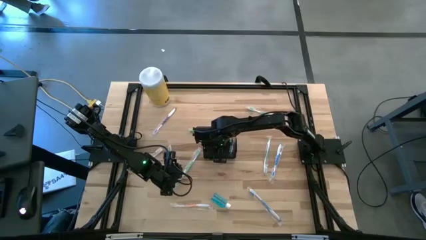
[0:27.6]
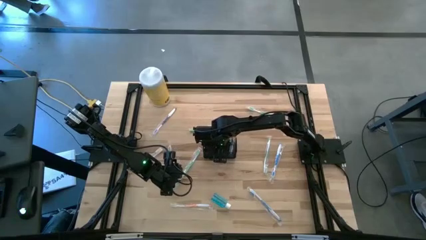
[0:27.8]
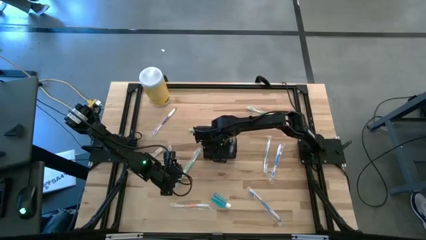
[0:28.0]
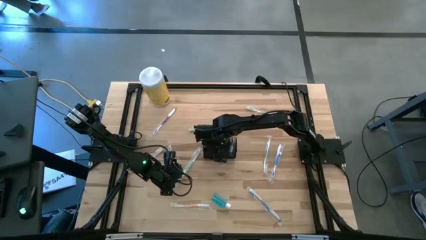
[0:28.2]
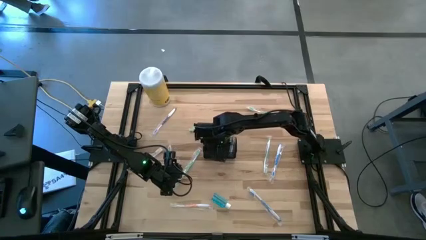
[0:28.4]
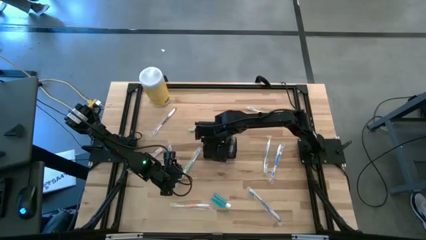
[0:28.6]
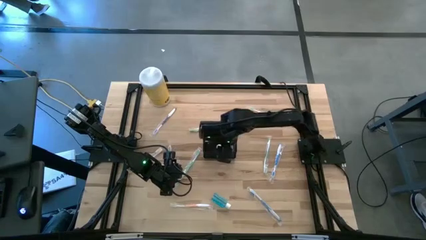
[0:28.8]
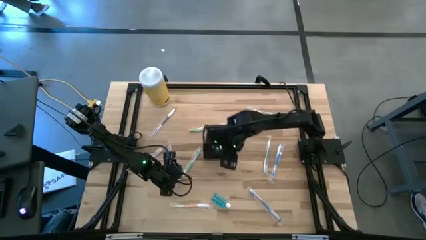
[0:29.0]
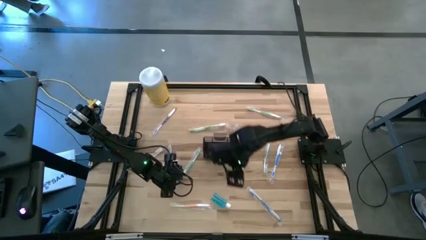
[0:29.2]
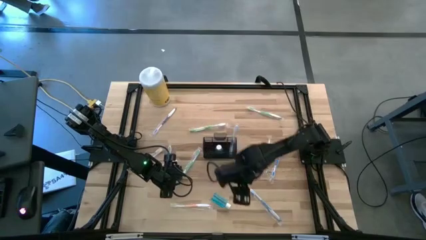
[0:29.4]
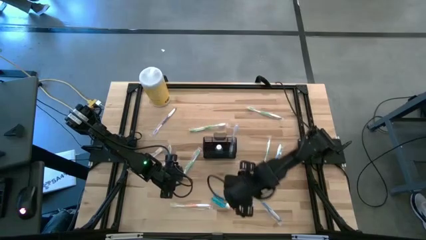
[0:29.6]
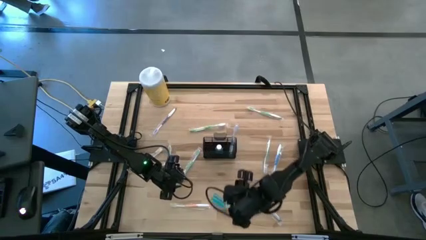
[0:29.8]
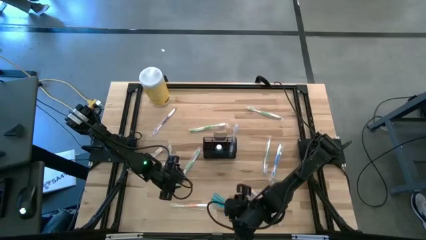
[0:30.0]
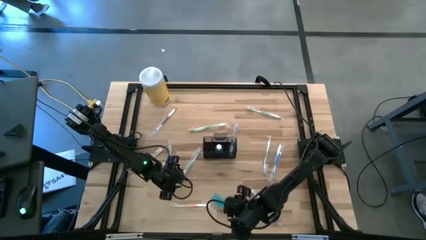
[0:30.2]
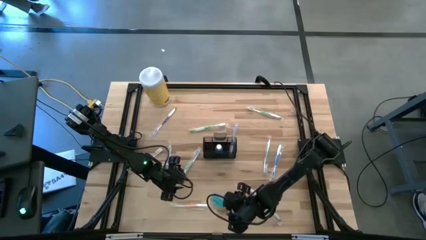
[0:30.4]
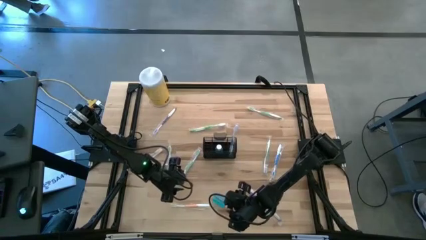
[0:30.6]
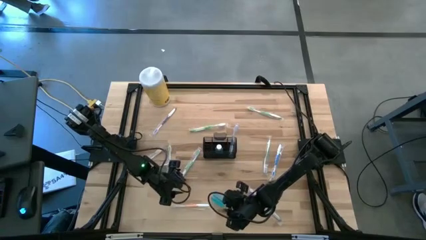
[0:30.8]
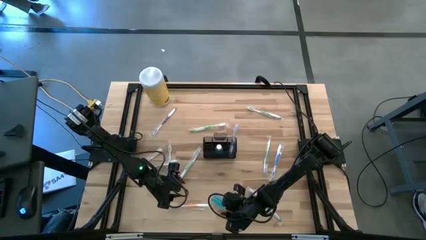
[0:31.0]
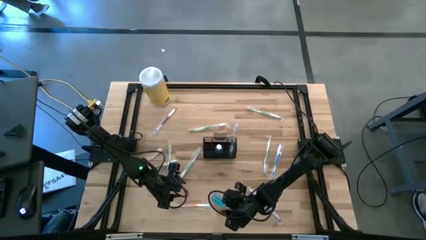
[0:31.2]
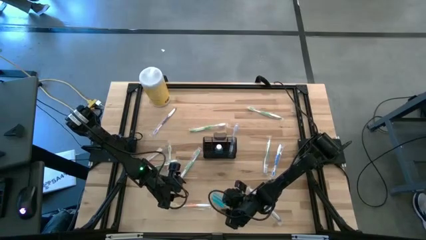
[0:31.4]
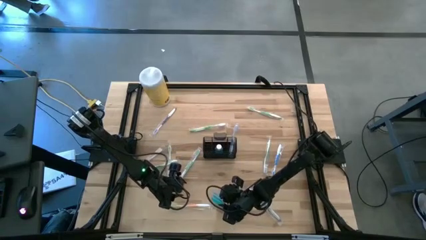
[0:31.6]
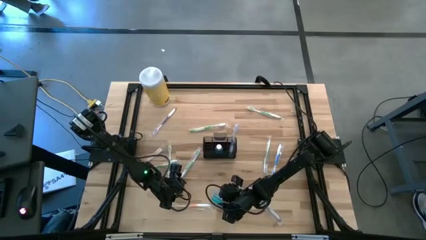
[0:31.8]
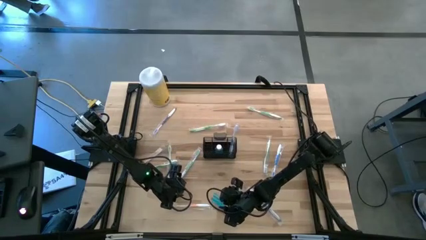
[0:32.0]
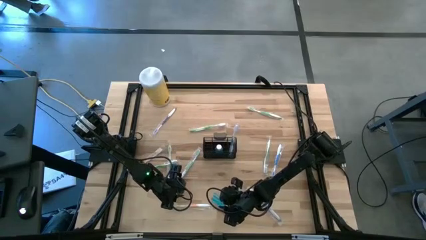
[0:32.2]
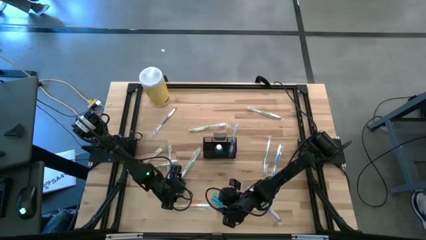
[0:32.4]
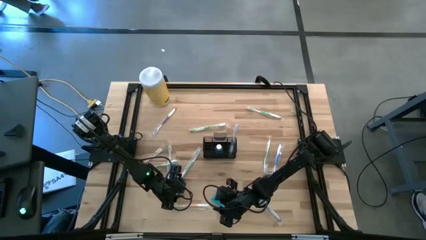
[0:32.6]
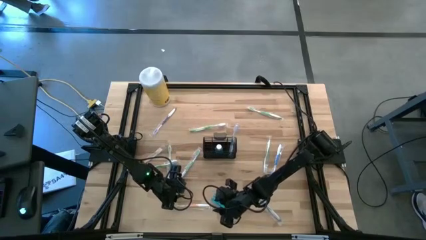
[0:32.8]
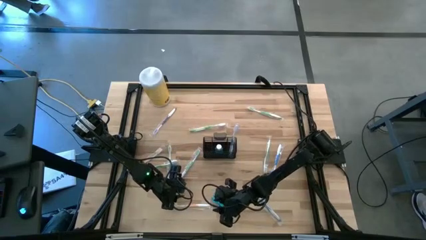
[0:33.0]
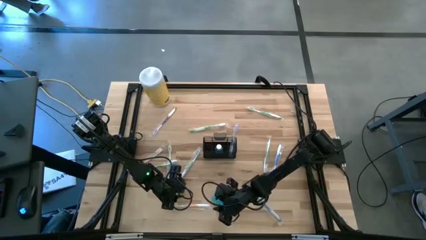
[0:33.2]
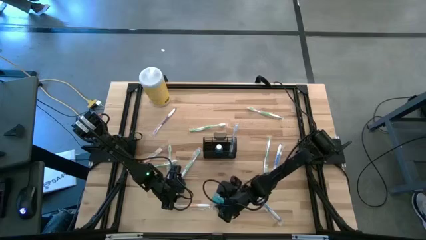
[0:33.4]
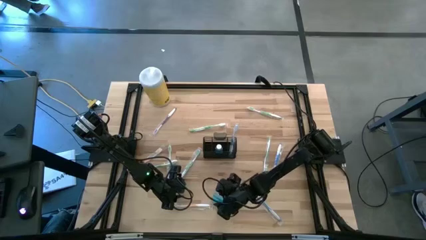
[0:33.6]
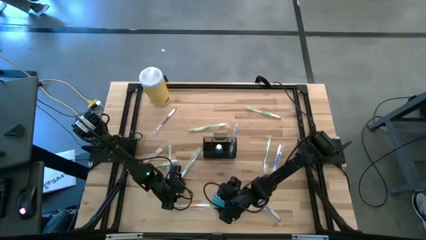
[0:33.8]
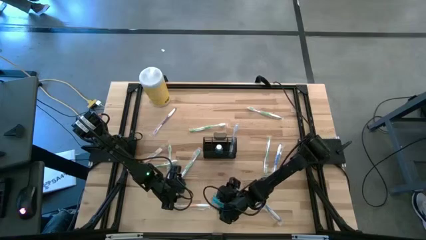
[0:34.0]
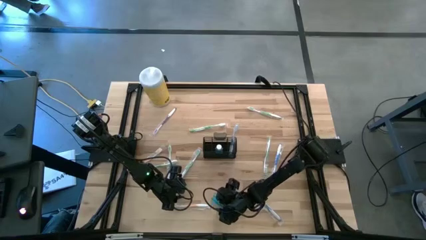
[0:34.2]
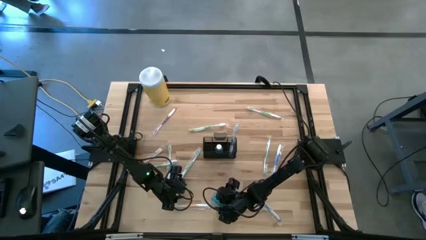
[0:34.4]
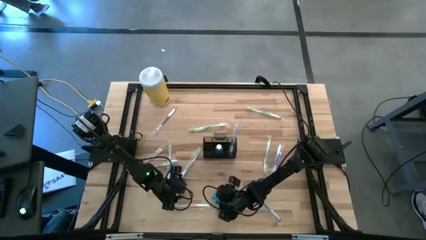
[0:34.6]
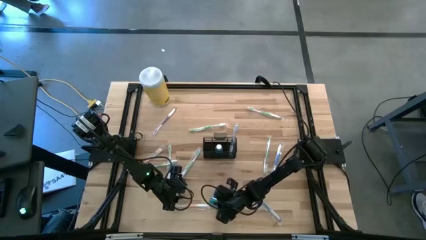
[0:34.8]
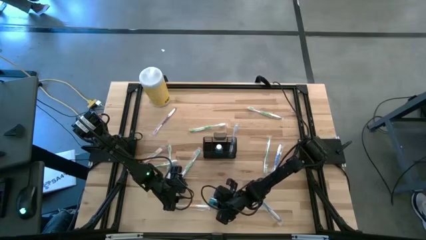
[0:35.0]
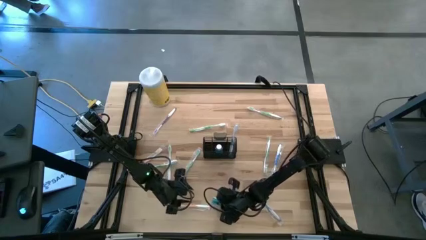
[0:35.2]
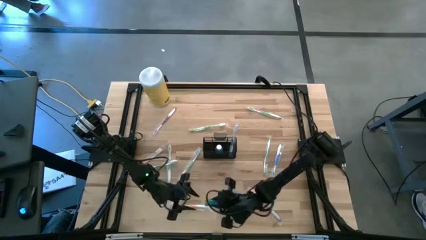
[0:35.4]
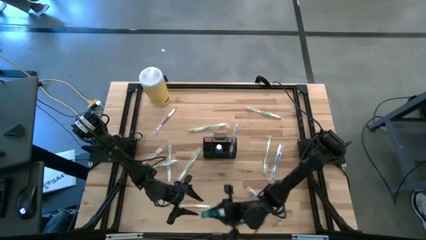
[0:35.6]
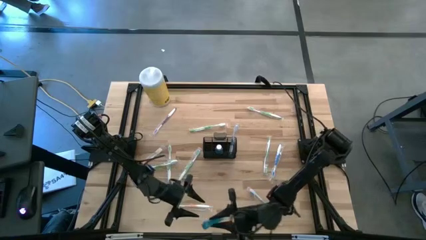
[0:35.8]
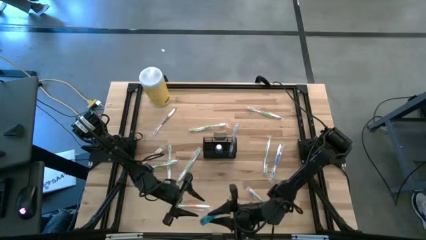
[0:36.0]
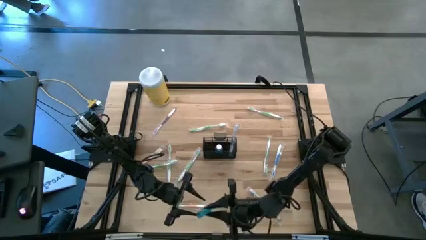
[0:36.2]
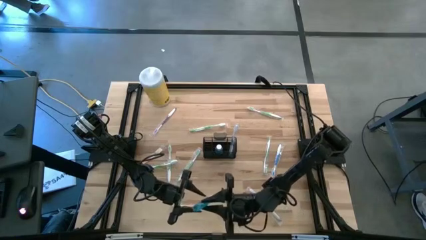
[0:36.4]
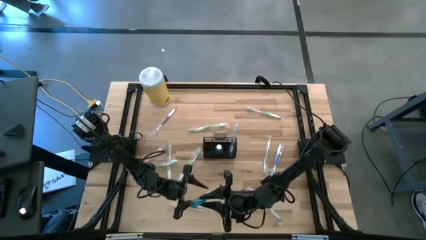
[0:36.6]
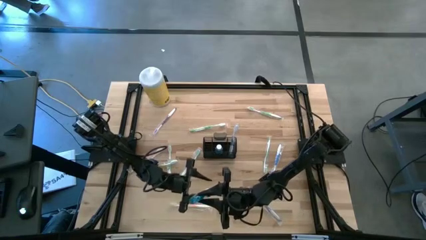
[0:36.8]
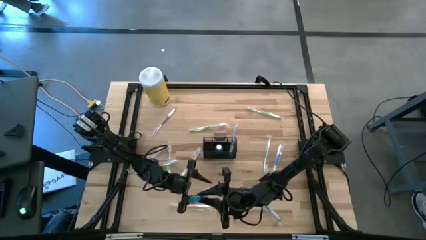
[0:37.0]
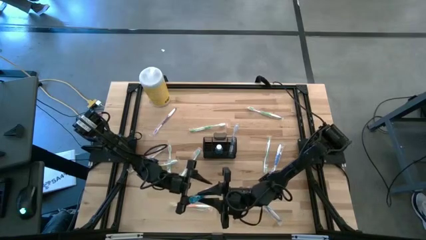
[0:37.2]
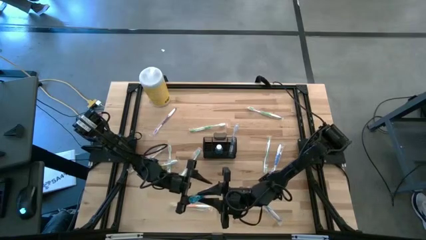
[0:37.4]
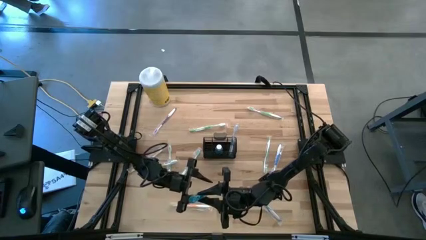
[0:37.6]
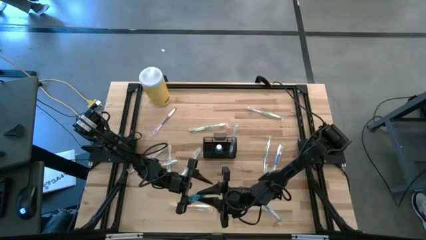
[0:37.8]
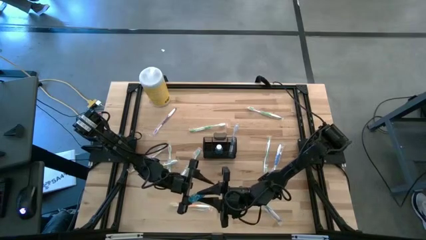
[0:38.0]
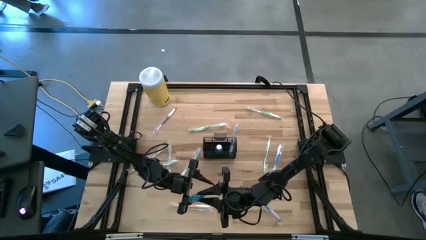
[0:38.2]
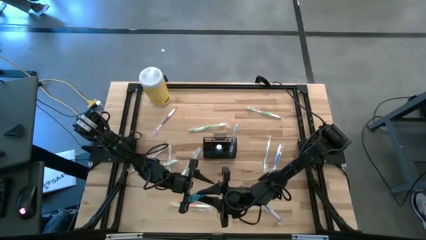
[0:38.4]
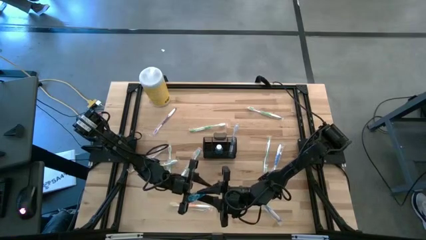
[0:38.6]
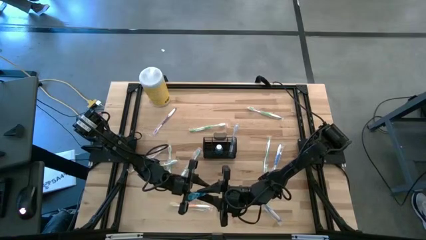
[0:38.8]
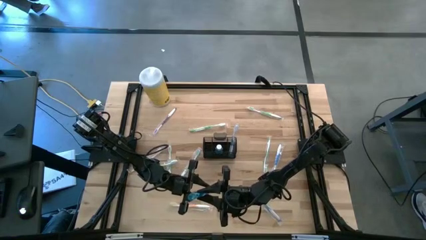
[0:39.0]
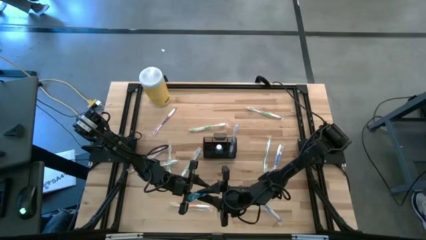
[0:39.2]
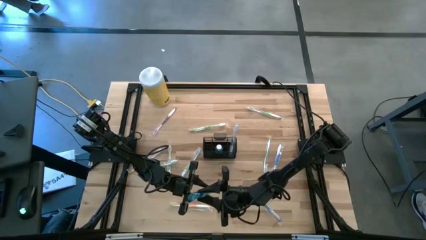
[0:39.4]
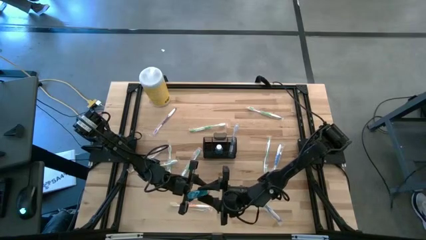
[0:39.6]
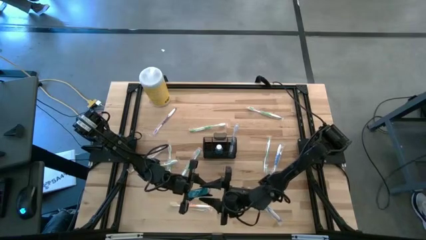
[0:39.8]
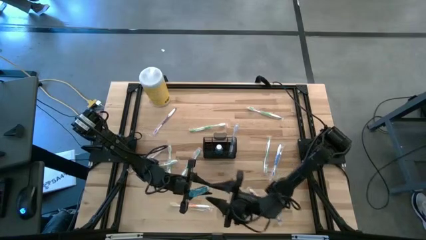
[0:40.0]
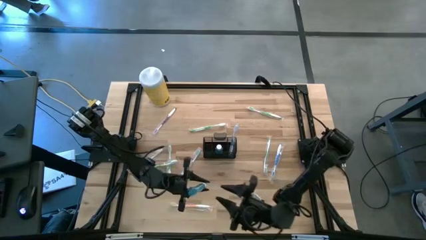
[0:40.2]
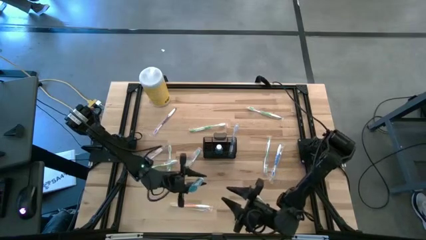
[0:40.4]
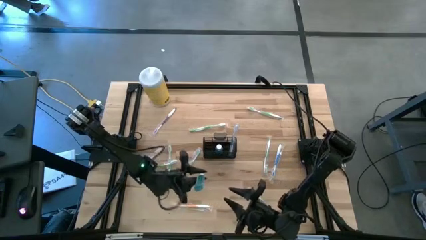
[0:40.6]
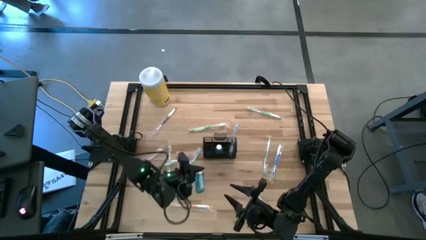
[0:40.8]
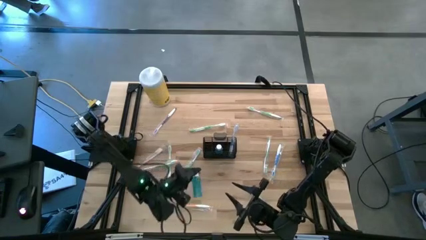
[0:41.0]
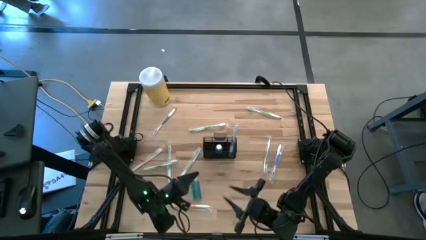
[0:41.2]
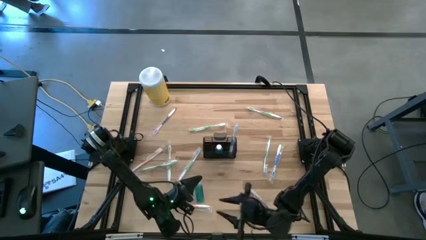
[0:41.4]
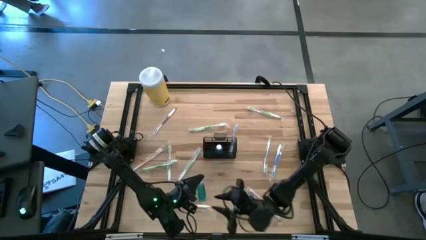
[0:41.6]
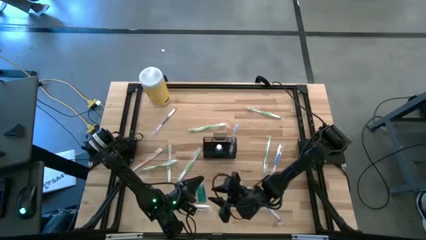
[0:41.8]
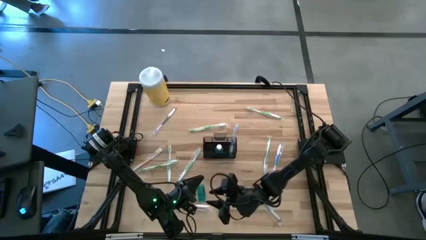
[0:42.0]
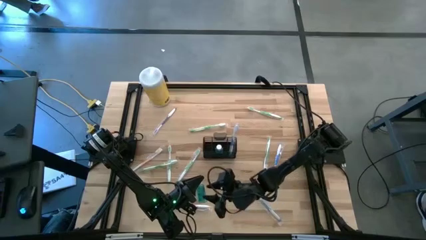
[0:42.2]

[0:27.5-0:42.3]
Task: Pick & Place toothbrushing station
Put the mouthwash into the wire organizer

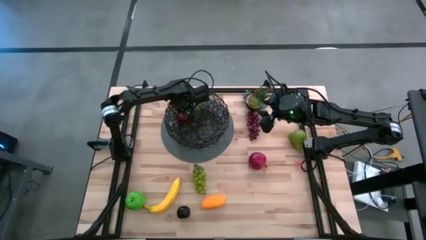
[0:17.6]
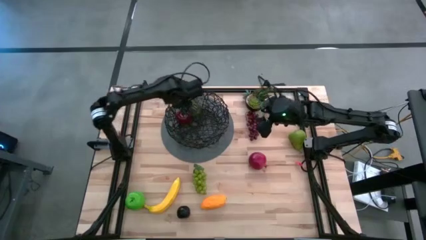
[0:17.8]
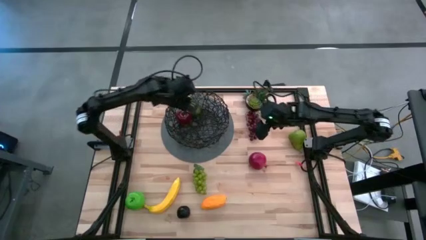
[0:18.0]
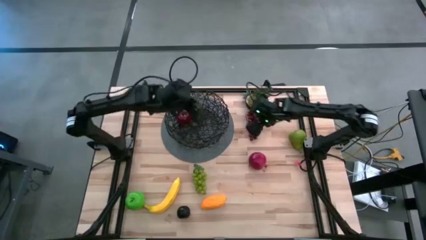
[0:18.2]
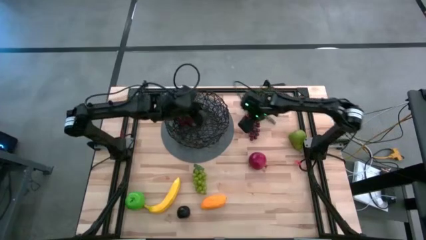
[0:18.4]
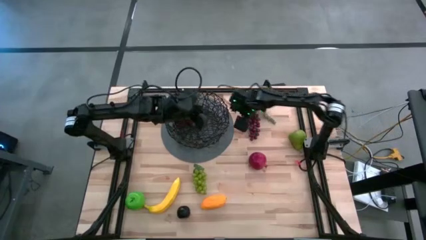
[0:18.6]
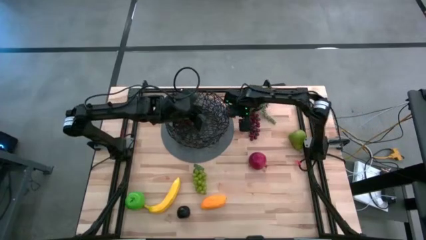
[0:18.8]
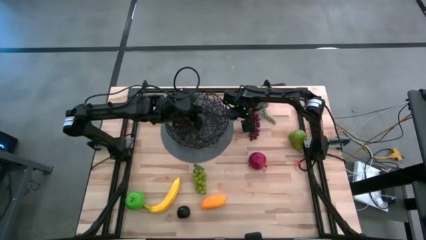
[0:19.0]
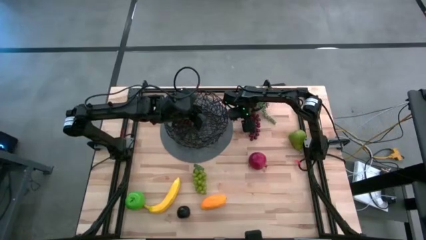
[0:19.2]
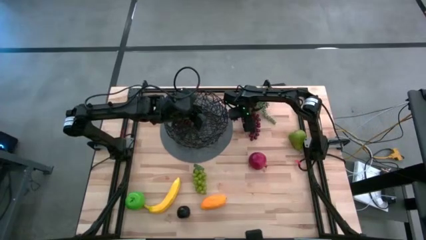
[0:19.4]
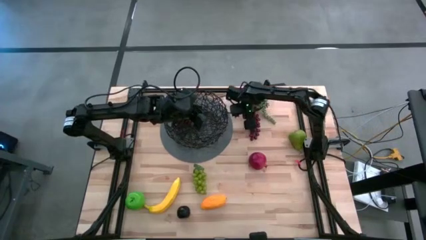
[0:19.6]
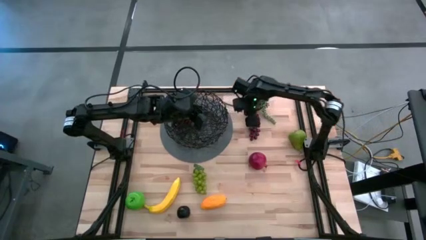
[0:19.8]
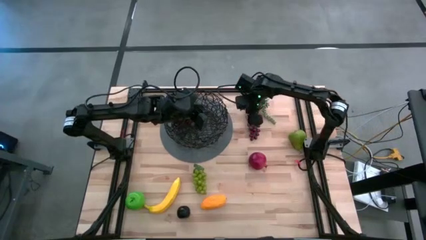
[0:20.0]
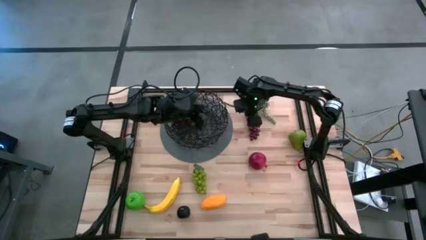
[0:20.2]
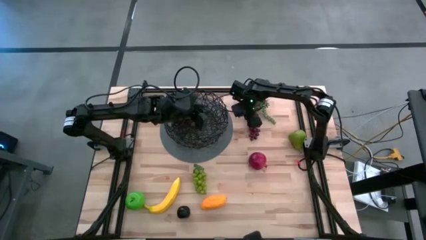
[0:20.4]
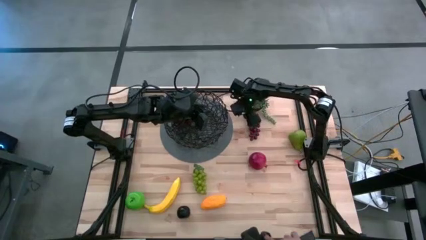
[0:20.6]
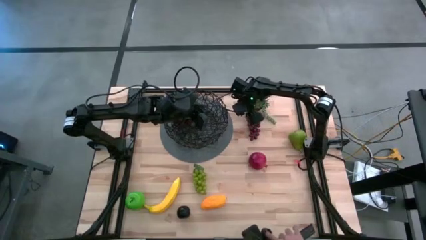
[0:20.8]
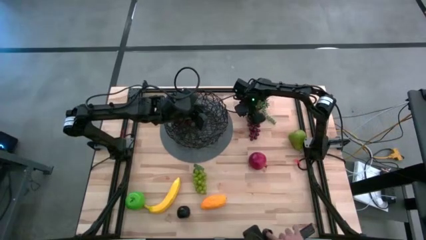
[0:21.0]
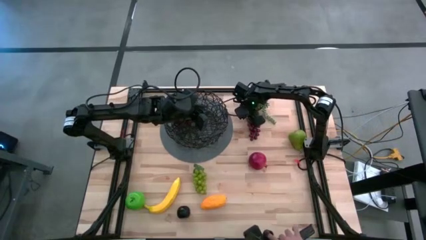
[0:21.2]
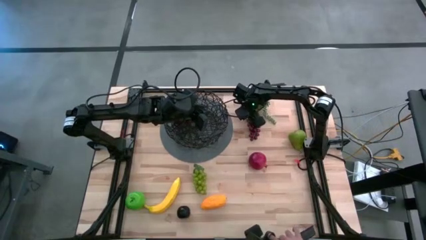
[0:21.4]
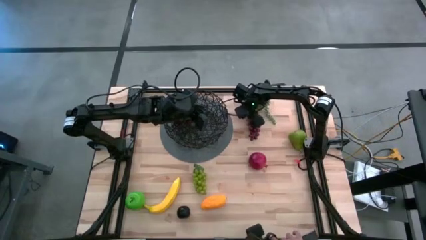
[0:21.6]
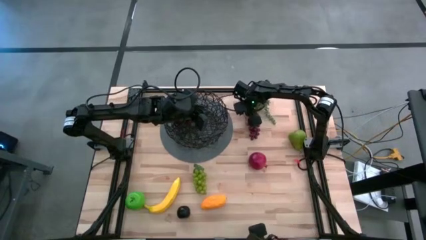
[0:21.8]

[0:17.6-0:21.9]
Task: Build produce basket
Put the red grapes into the black wire basket
